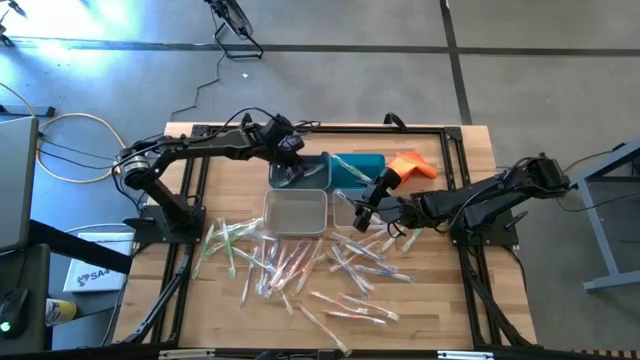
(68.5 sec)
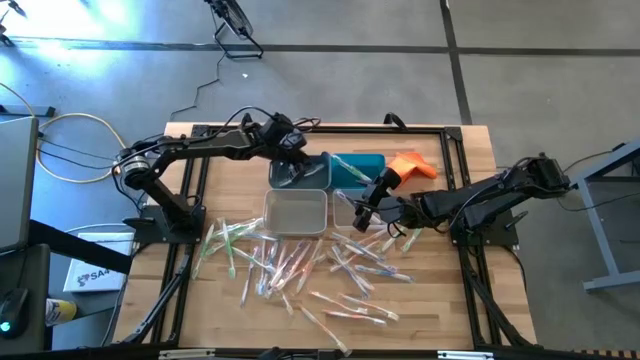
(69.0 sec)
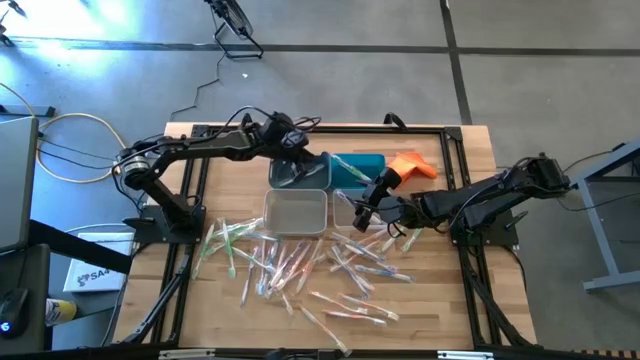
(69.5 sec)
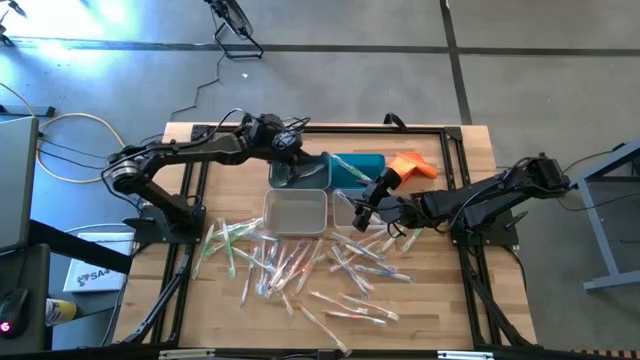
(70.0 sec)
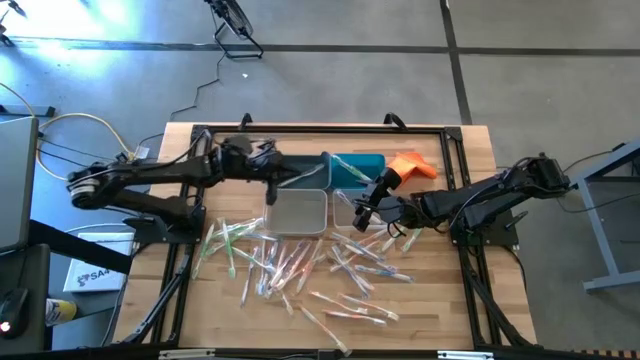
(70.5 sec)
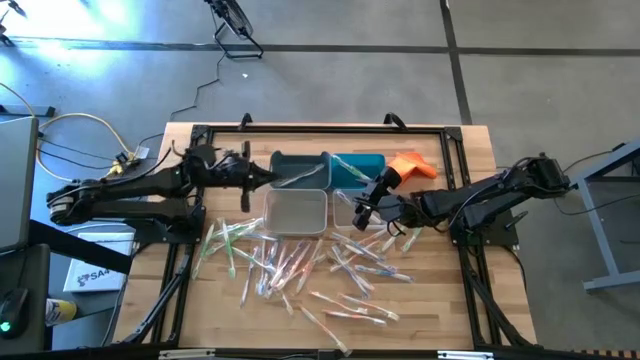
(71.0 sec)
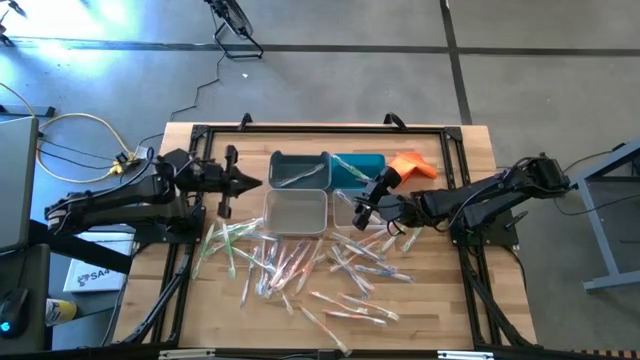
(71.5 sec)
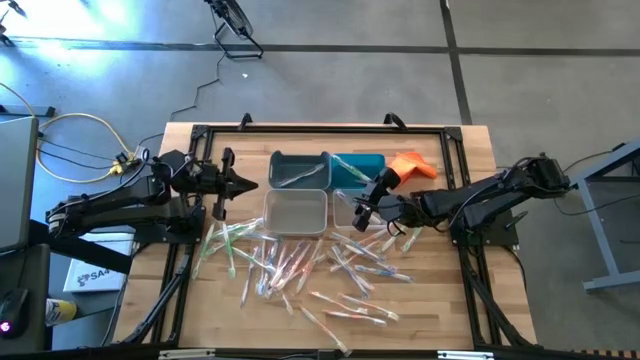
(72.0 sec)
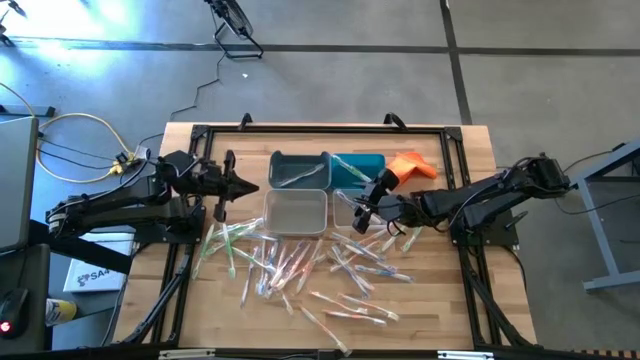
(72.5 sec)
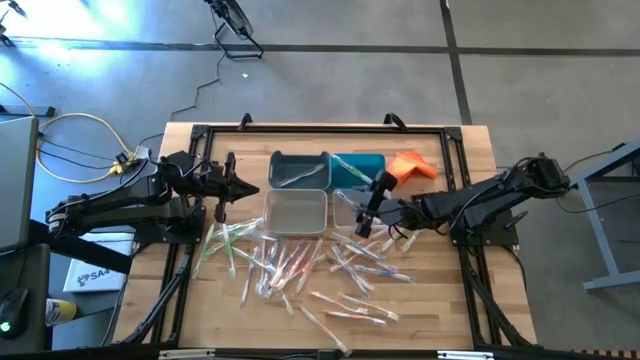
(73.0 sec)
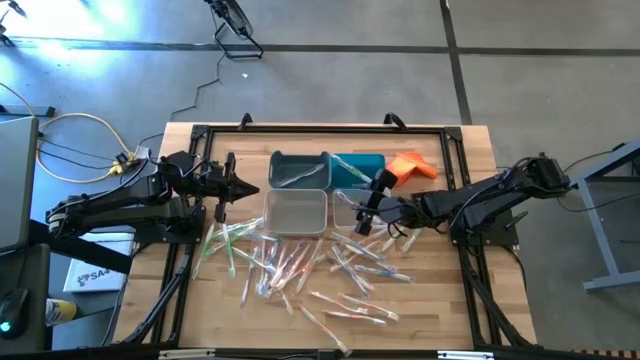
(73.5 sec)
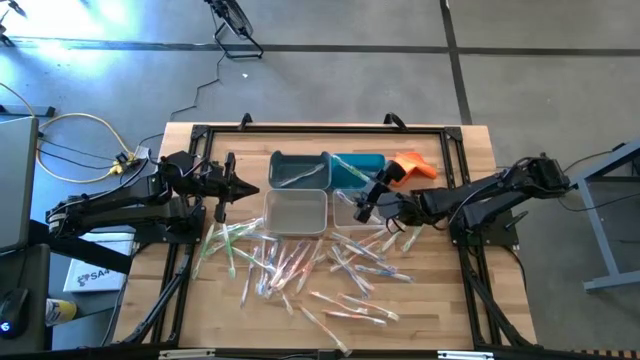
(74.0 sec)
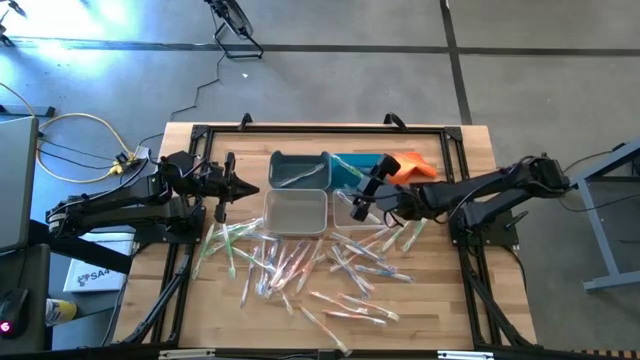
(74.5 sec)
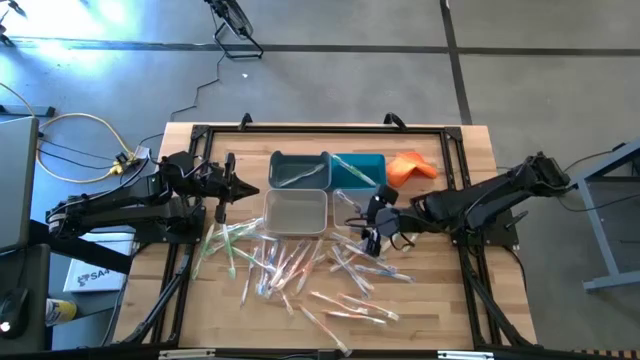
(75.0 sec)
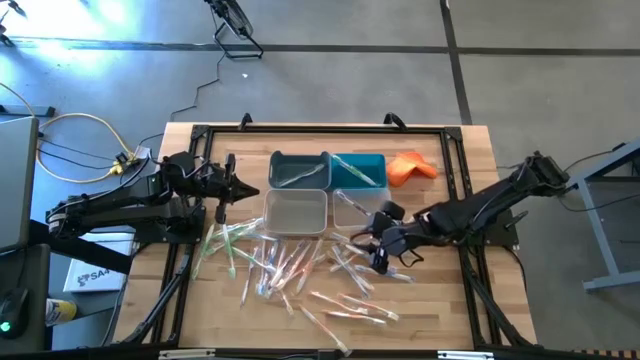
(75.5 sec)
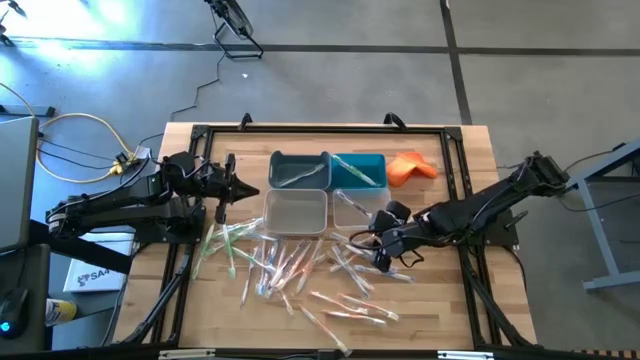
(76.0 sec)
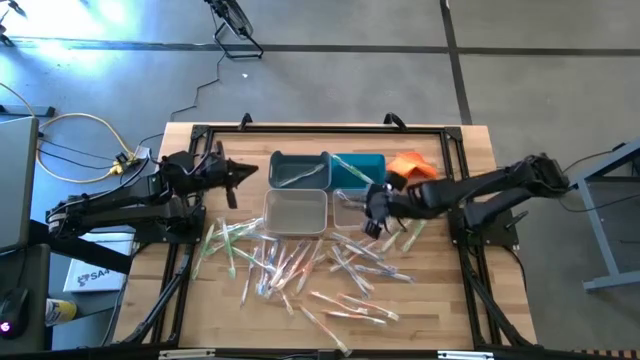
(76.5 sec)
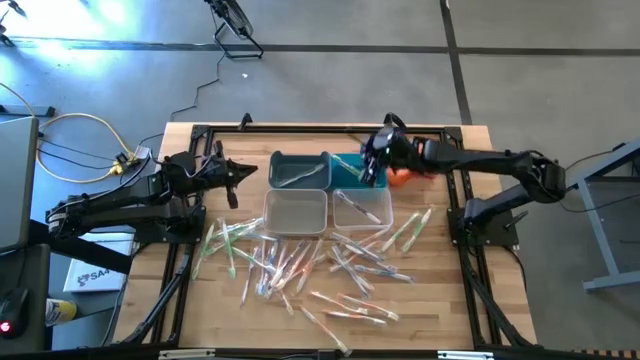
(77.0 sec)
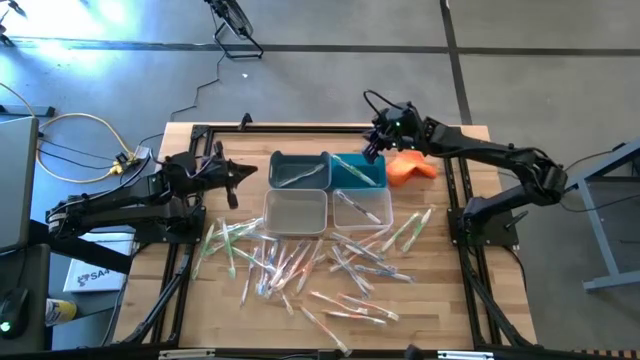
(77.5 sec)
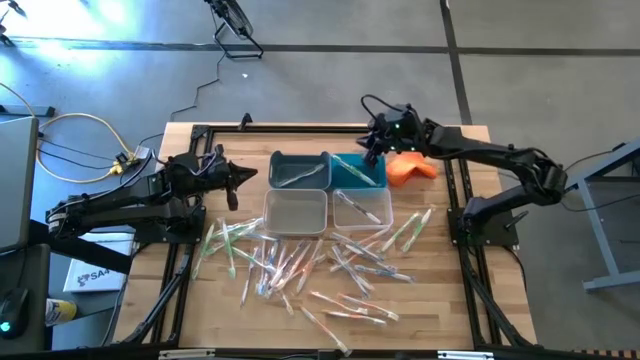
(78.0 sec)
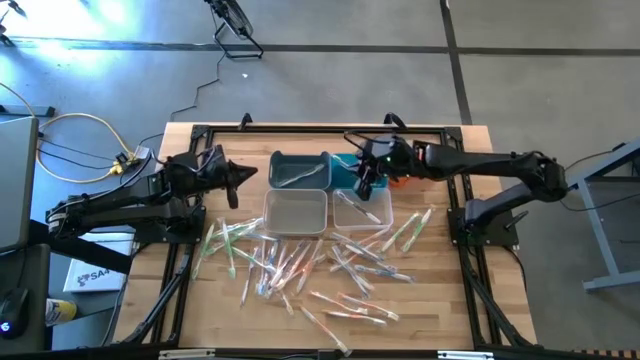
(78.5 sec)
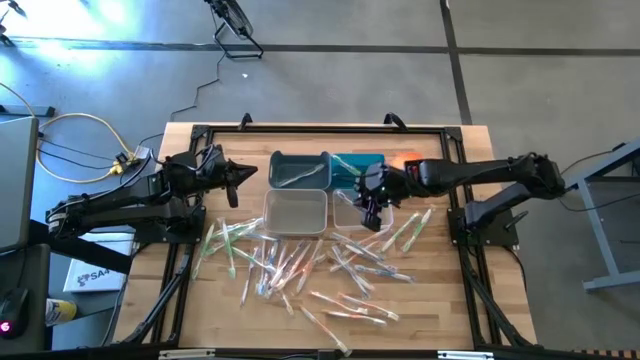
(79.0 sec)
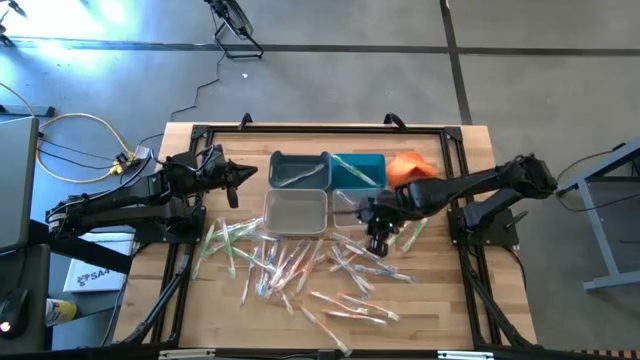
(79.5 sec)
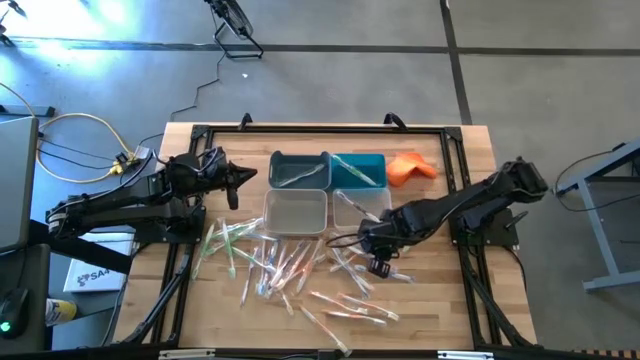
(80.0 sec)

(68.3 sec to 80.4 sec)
Task: Pick & Place Toothbrushes
Put the blue toothbrush into the dark blue bin

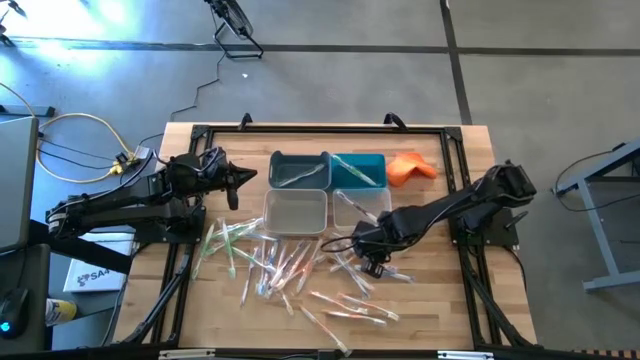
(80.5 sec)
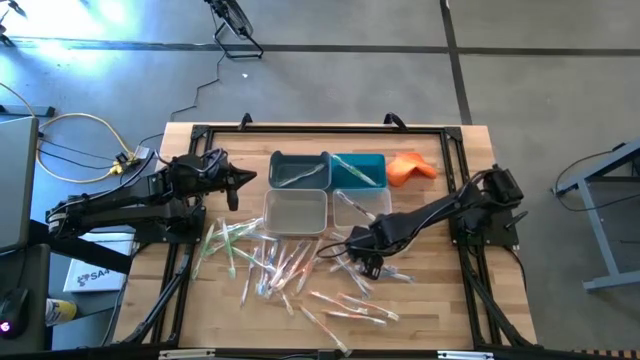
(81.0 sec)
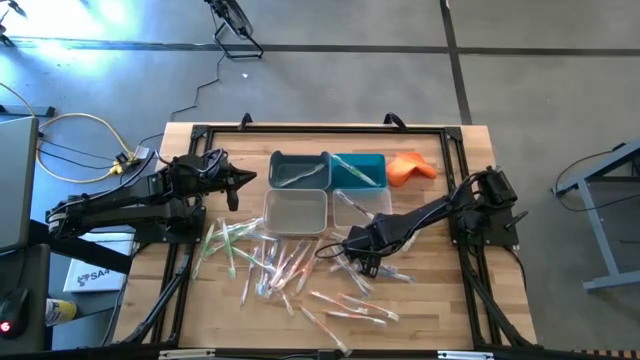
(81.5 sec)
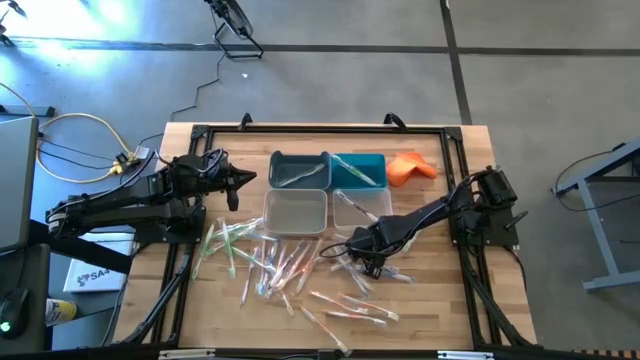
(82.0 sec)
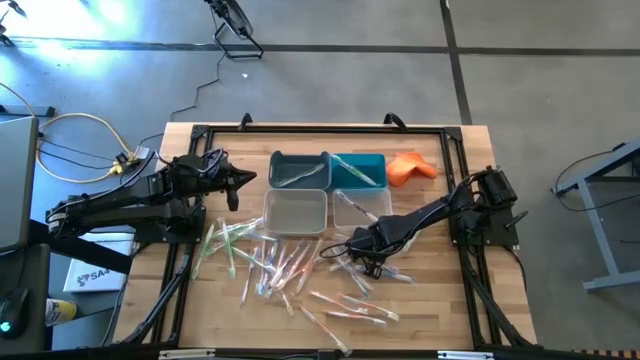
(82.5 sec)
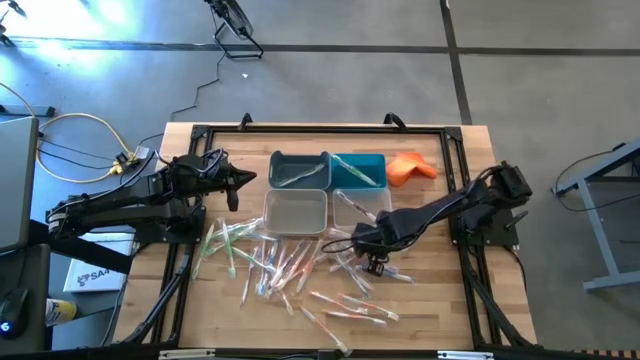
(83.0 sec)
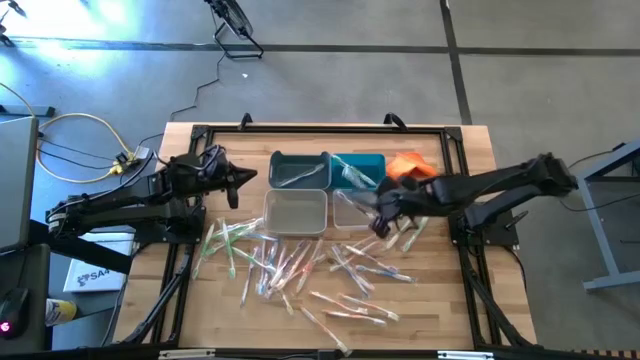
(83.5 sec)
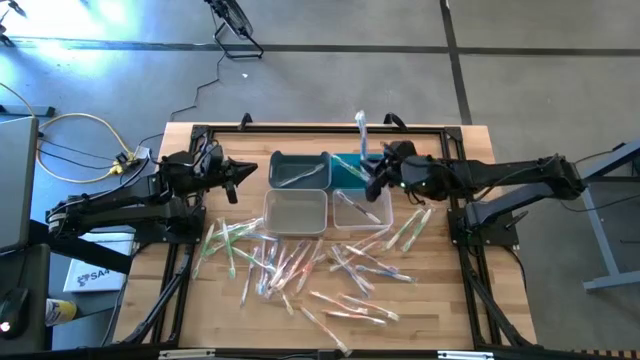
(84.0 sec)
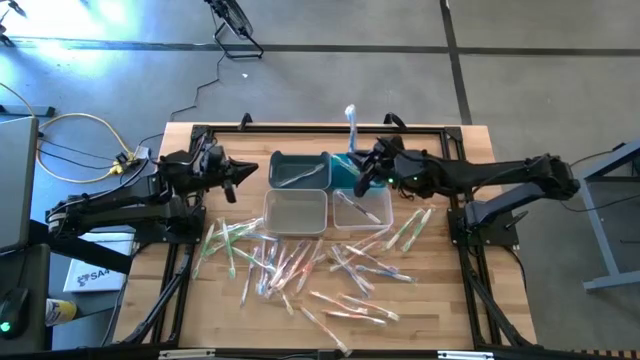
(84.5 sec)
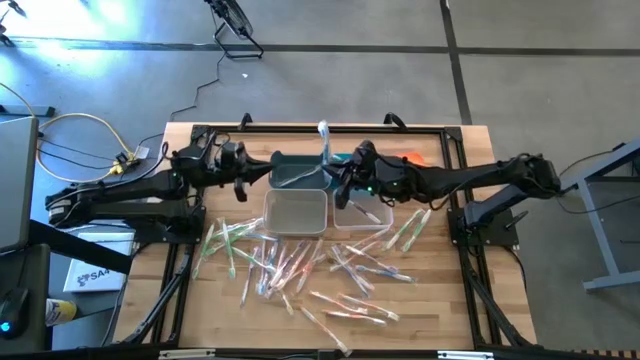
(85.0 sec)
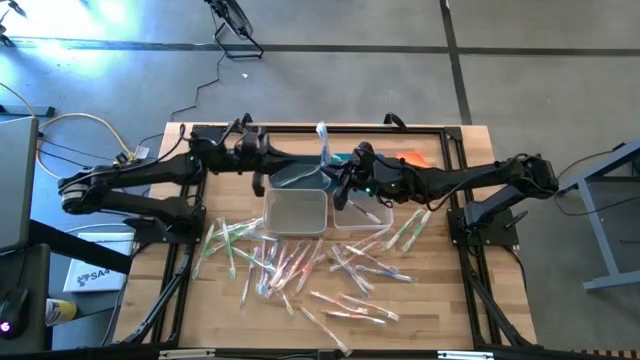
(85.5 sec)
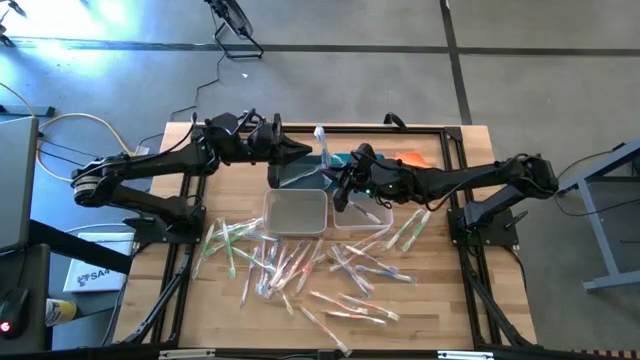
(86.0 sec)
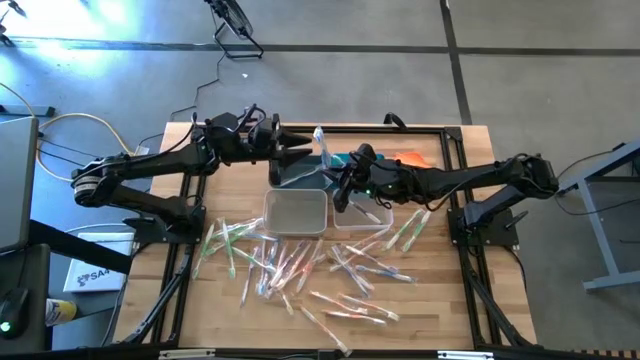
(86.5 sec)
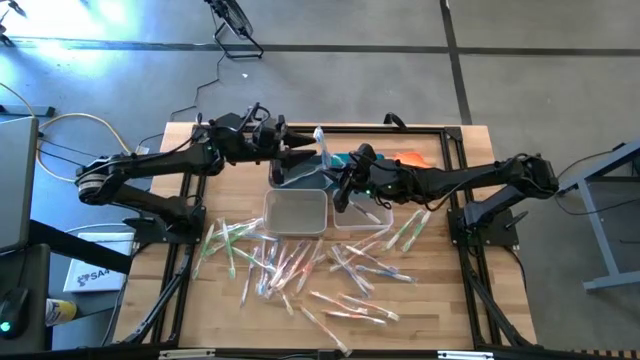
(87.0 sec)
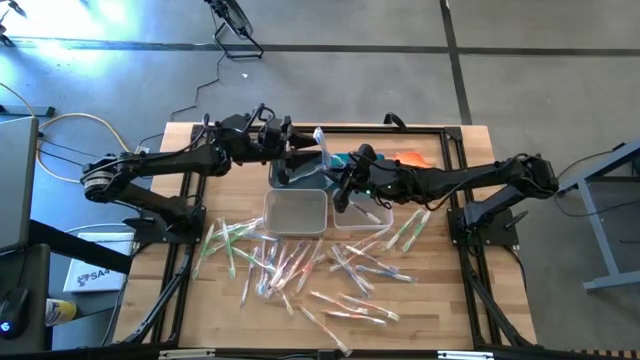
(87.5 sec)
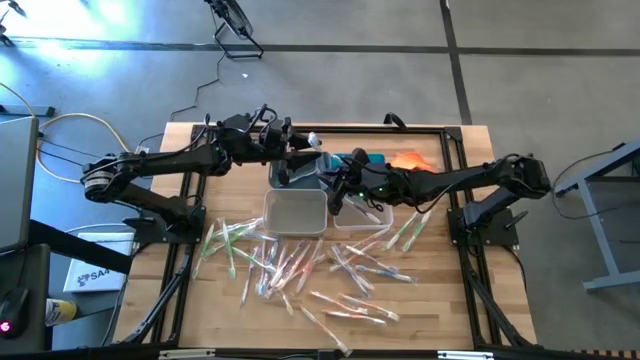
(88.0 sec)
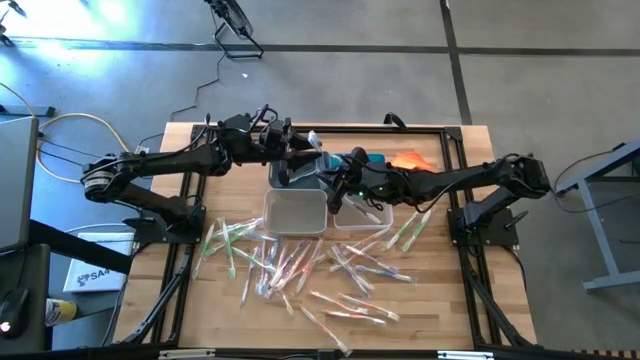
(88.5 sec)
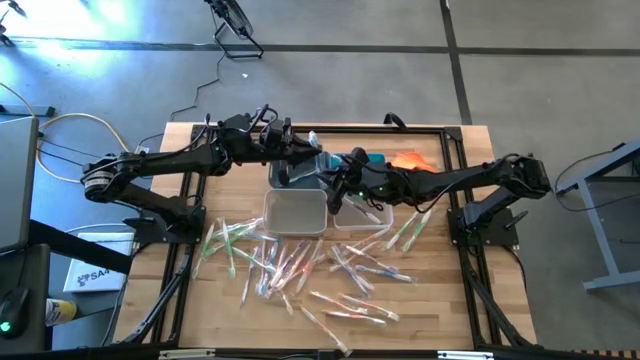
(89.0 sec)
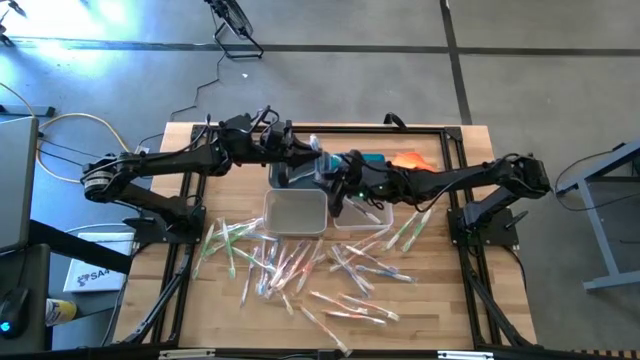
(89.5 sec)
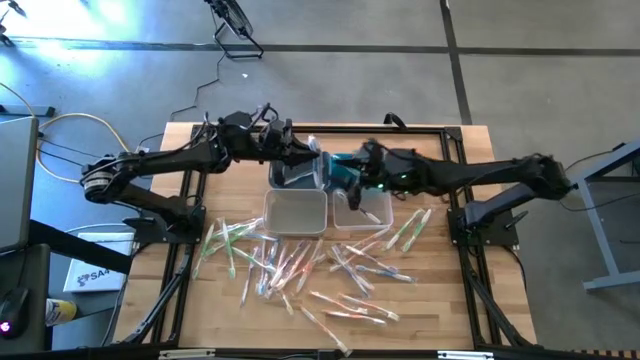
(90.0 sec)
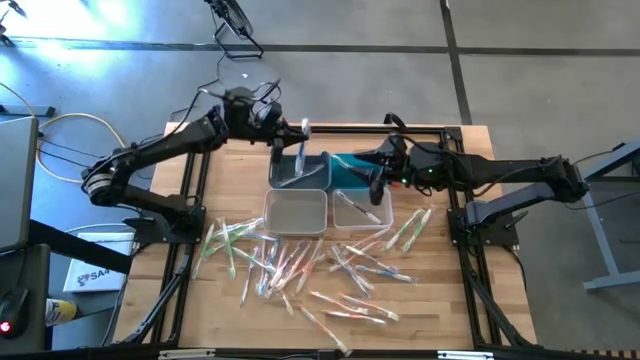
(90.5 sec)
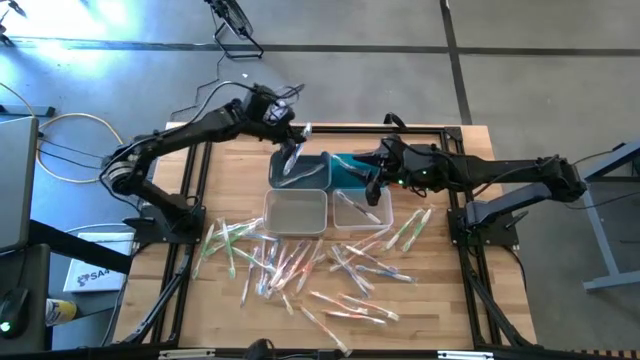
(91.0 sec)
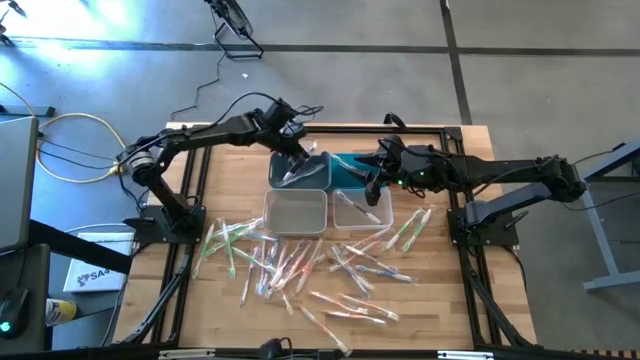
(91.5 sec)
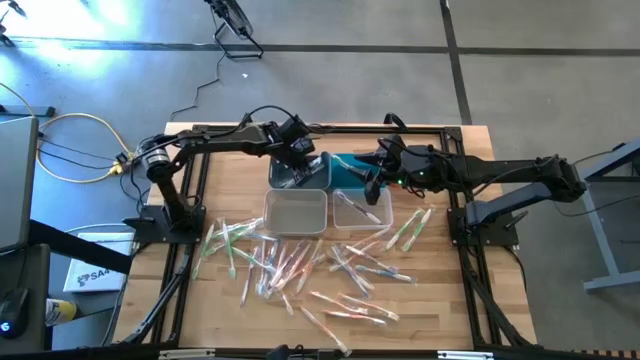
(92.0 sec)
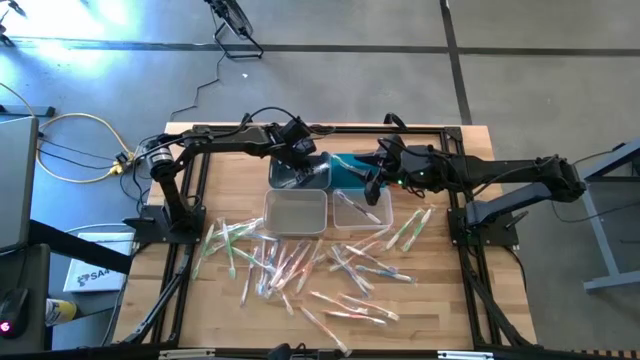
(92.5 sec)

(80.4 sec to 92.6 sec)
Put the blue toothbrush into the dark blue bin
